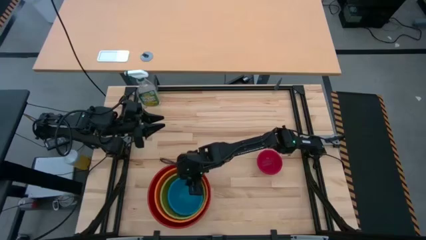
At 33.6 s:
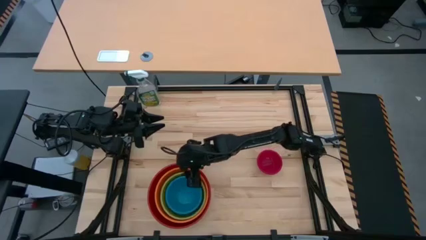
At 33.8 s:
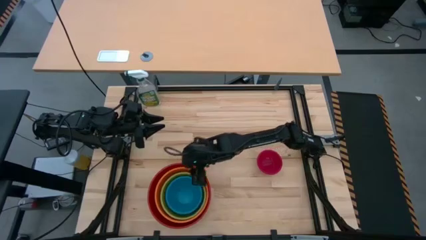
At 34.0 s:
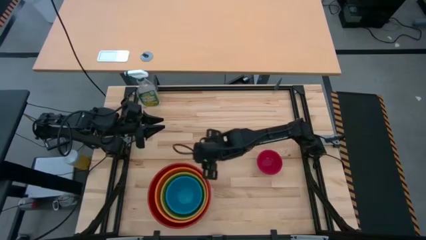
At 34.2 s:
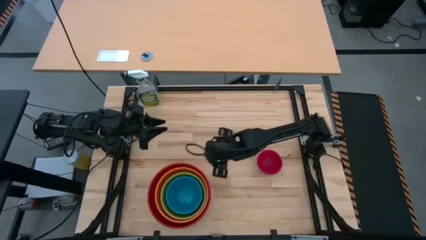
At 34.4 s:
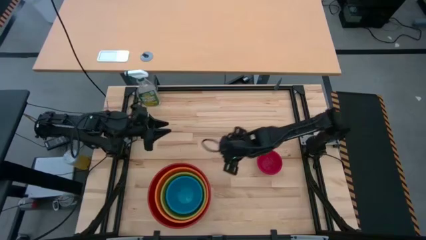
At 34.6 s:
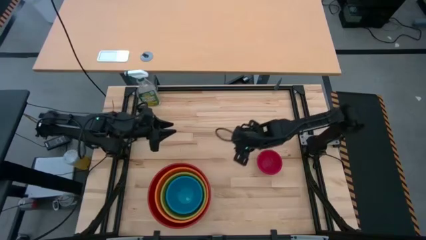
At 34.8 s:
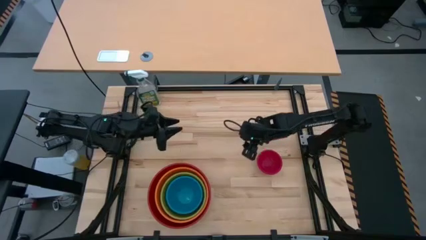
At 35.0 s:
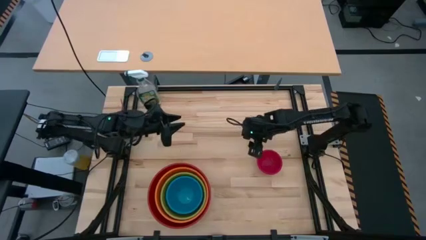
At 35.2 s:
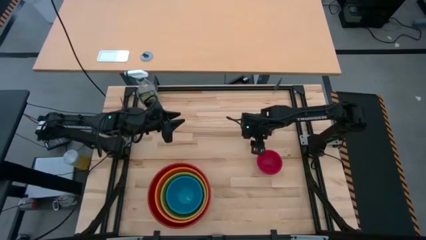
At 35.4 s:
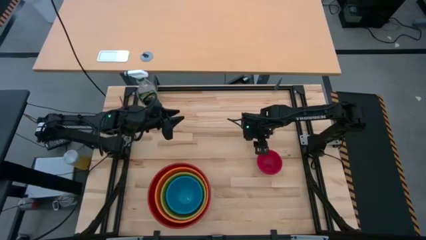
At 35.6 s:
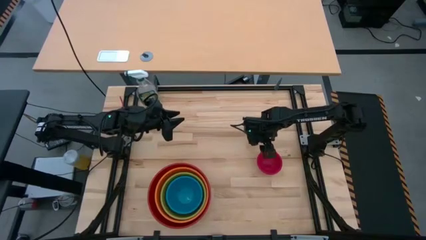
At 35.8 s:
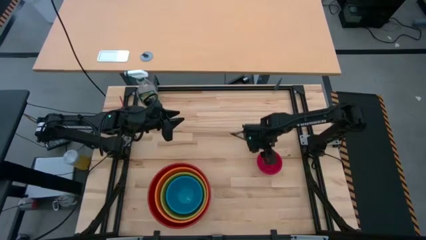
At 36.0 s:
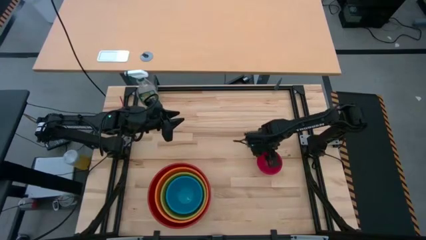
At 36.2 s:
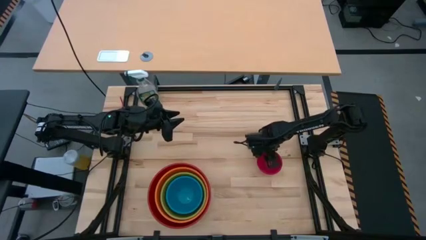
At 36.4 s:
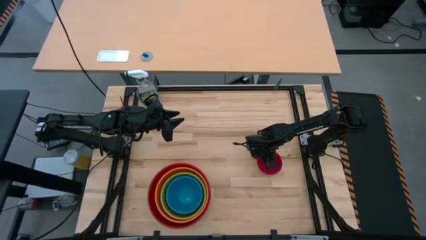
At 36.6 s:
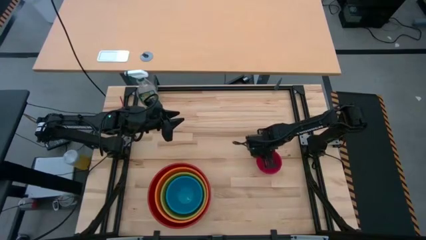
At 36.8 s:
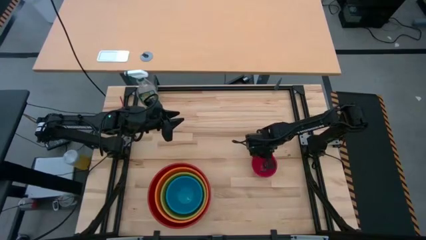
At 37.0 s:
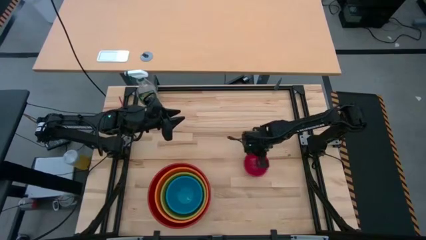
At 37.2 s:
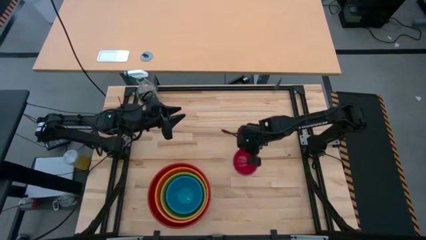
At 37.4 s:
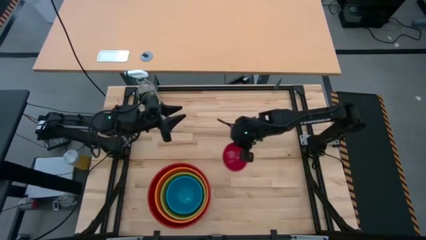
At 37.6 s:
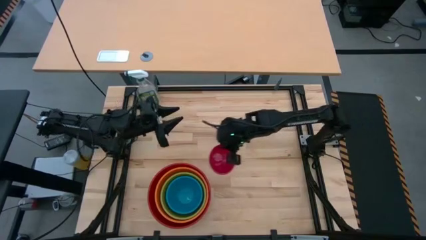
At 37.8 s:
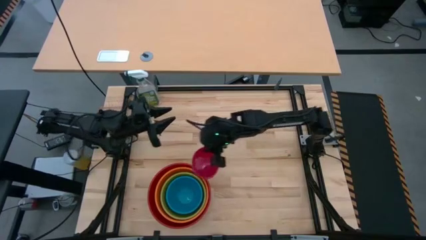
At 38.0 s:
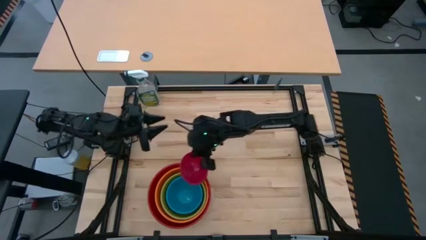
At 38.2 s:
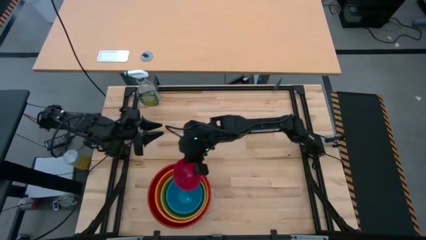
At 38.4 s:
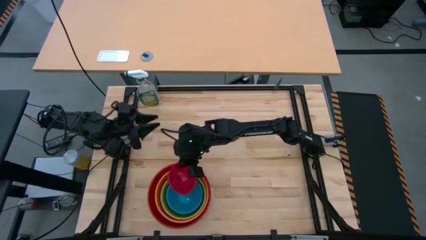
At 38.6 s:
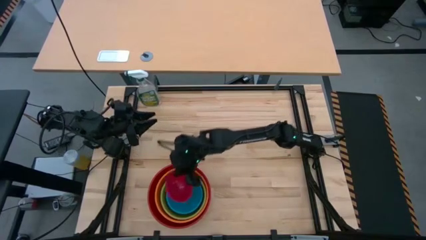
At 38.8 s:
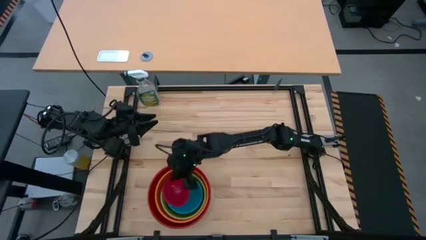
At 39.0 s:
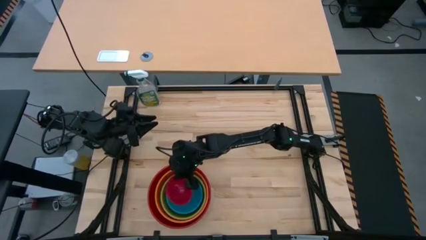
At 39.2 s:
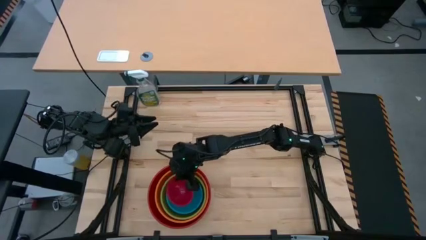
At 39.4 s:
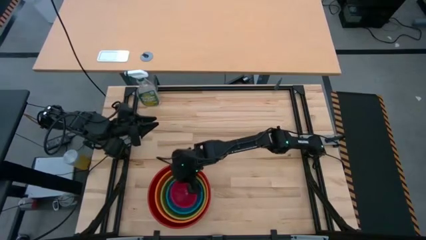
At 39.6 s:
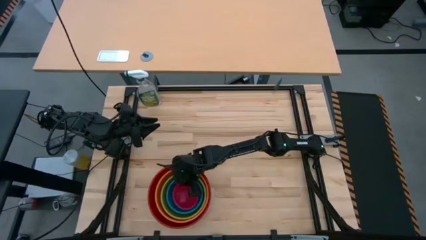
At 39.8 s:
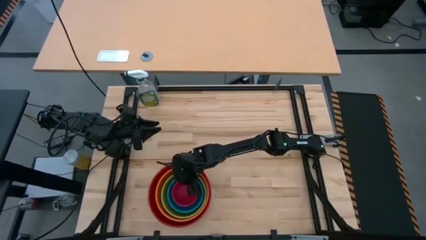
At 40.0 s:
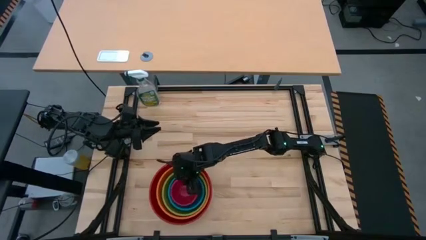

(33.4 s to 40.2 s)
Stack the pink bowl on top of the blue bowl

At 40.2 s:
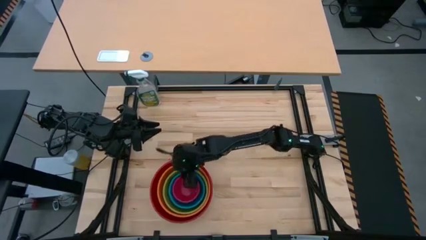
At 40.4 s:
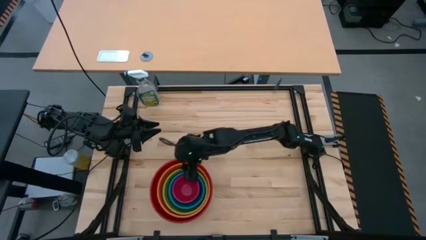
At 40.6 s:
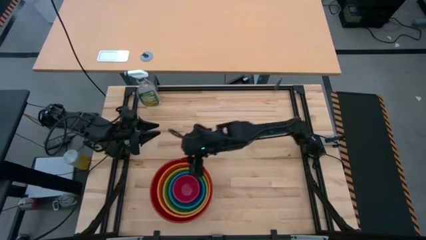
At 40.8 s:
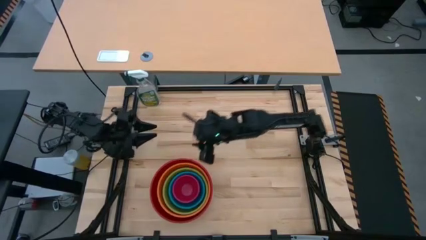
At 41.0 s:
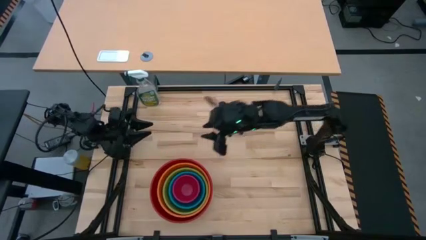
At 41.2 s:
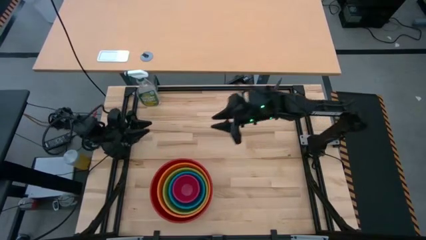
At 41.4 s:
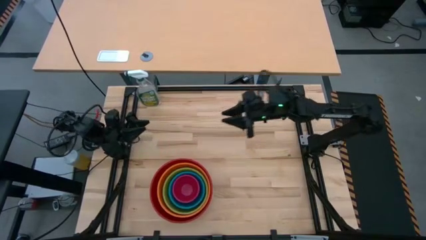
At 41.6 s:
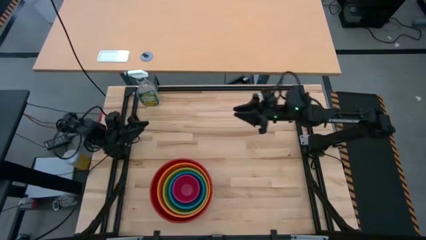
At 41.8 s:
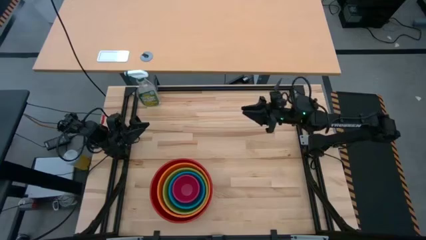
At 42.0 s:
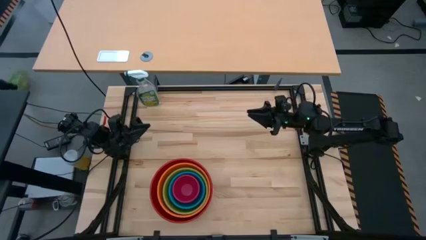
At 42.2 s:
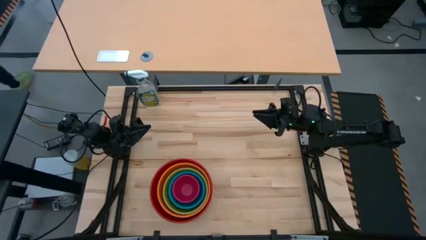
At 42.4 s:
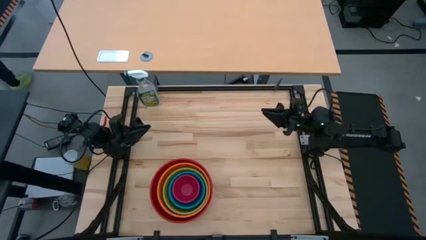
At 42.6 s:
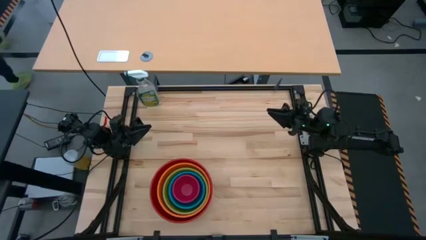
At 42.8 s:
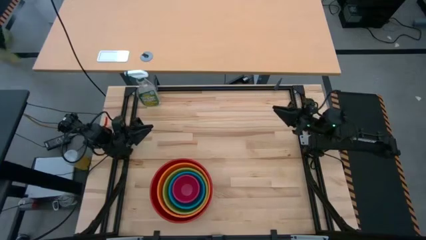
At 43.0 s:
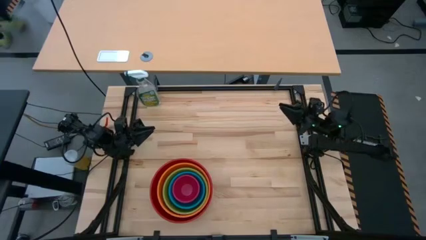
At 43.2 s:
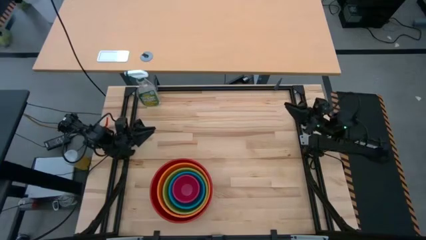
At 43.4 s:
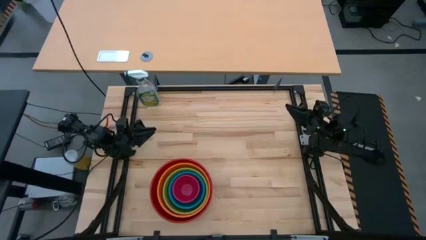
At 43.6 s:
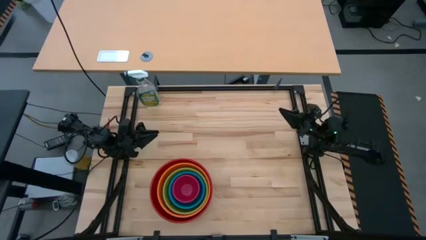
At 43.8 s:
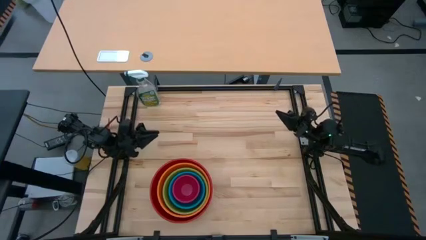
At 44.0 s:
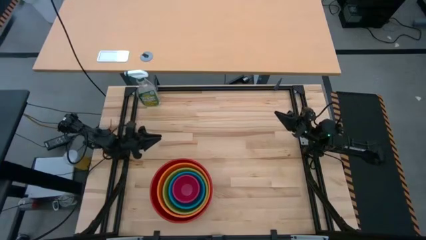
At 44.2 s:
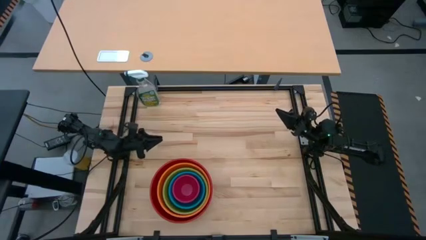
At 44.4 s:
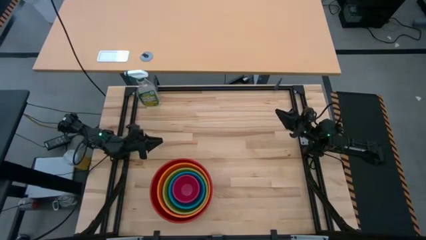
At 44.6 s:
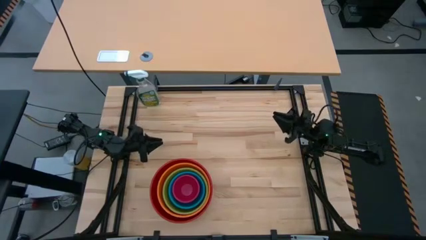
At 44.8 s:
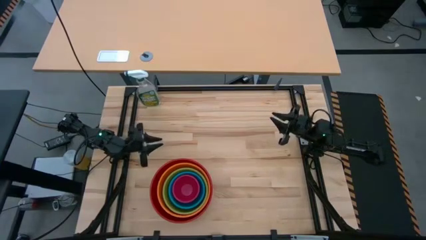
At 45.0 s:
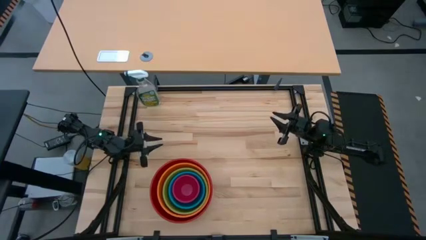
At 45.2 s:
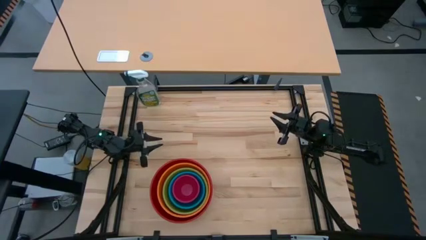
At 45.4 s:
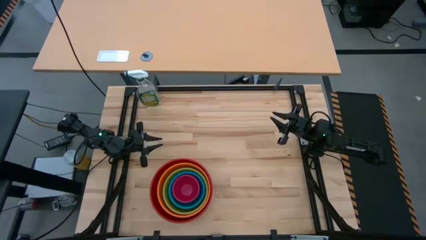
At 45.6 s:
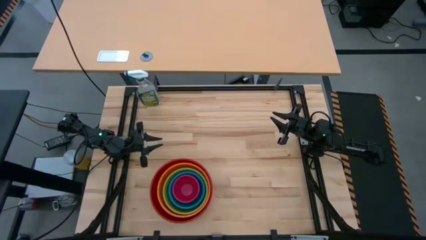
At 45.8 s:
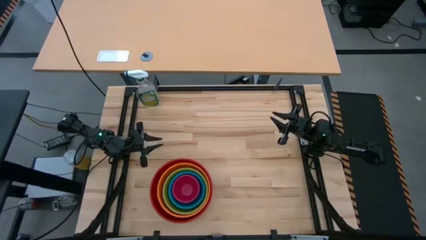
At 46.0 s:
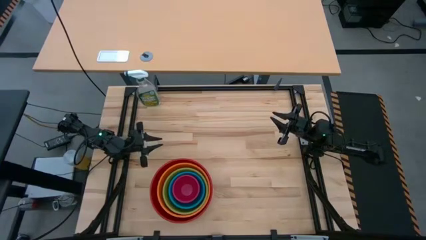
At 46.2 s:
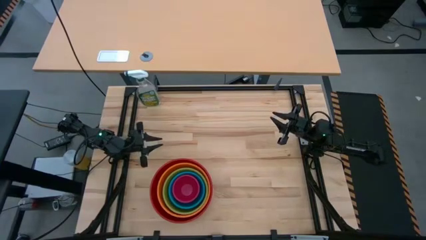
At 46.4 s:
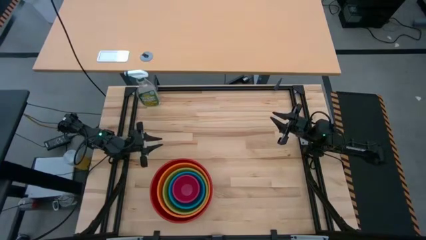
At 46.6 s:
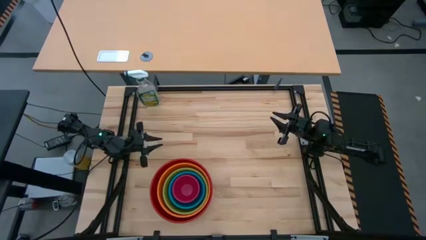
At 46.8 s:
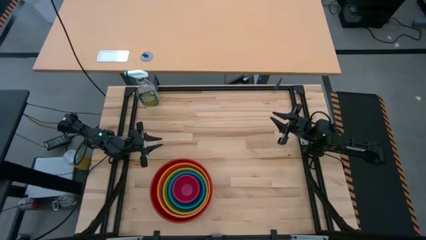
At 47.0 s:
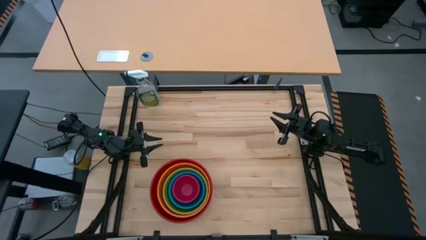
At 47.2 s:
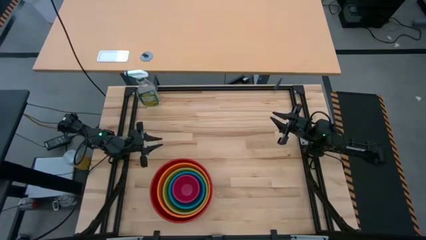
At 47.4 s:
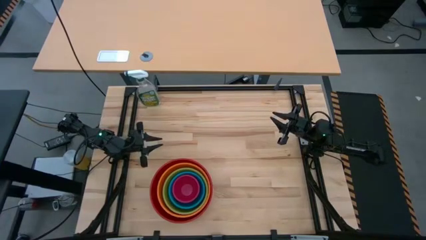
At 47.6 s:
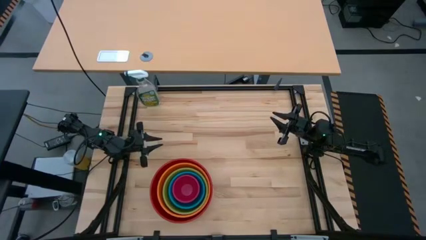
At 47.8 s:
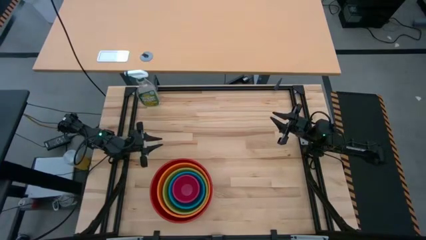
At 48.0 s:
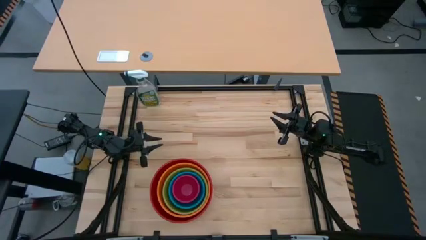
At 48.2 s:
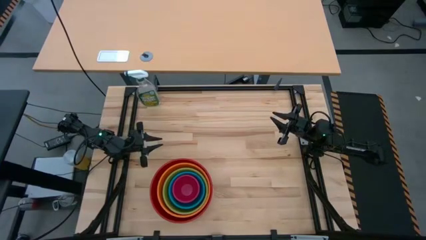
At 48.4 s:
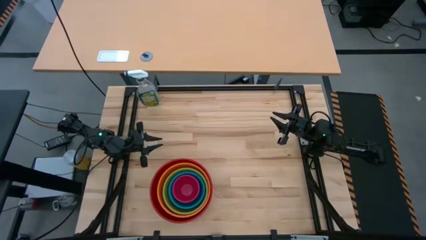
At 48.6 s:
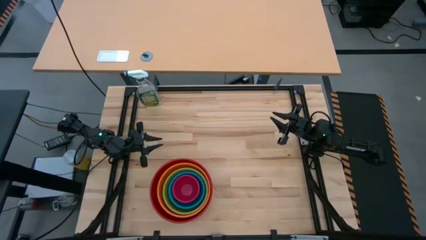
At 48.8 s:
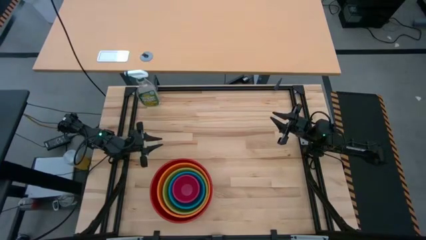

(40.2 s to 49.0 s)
Return to Home Position
